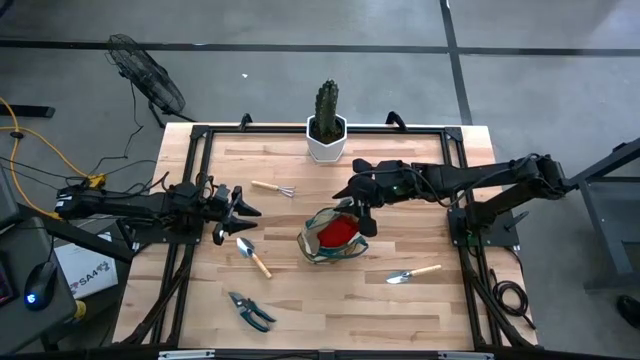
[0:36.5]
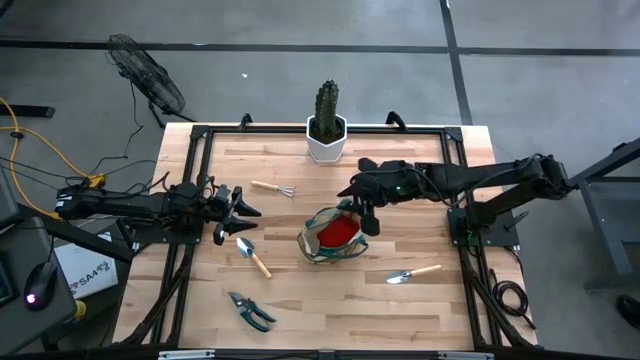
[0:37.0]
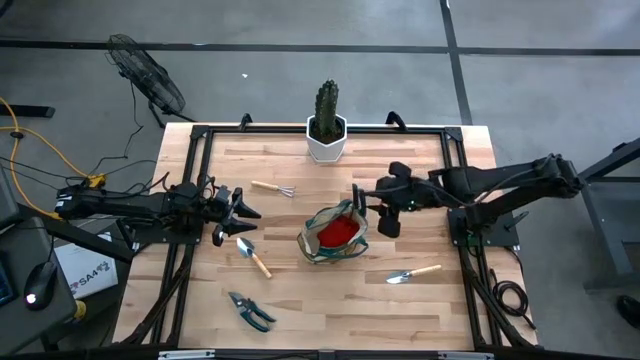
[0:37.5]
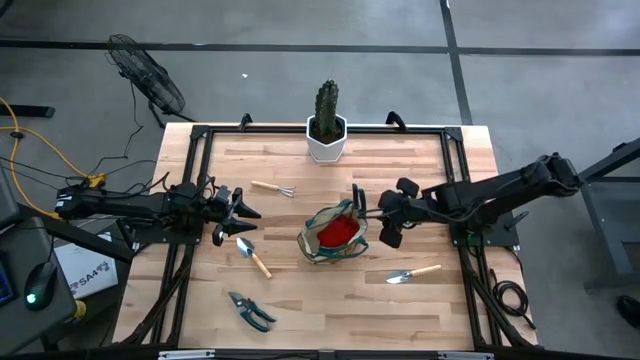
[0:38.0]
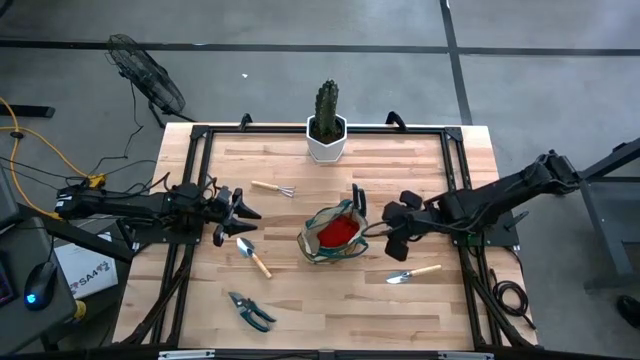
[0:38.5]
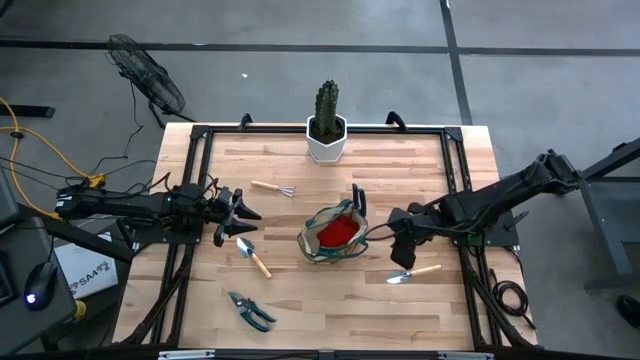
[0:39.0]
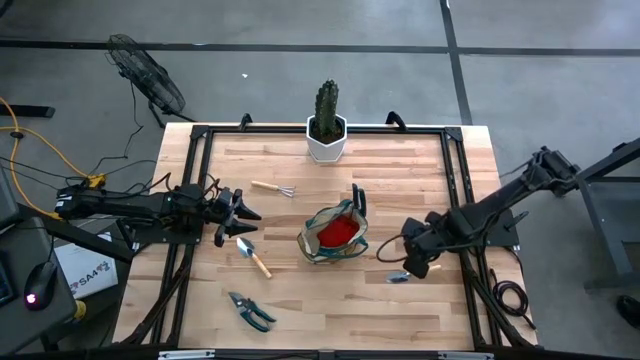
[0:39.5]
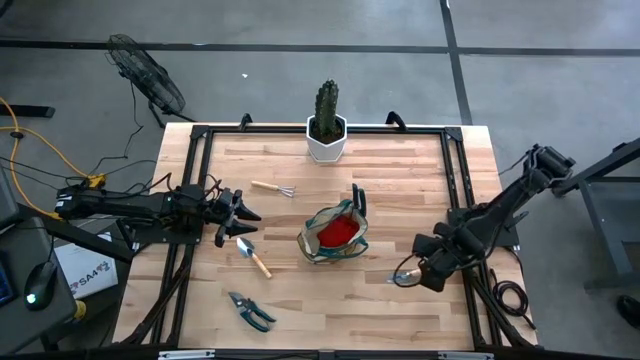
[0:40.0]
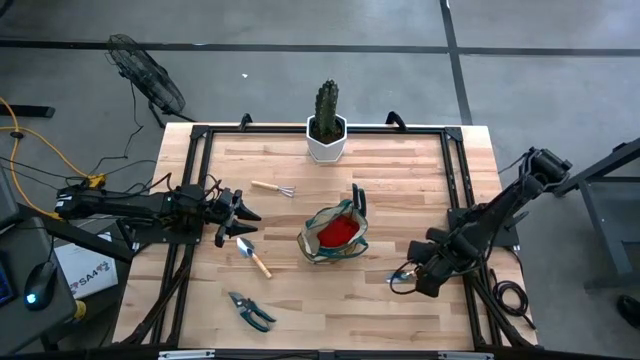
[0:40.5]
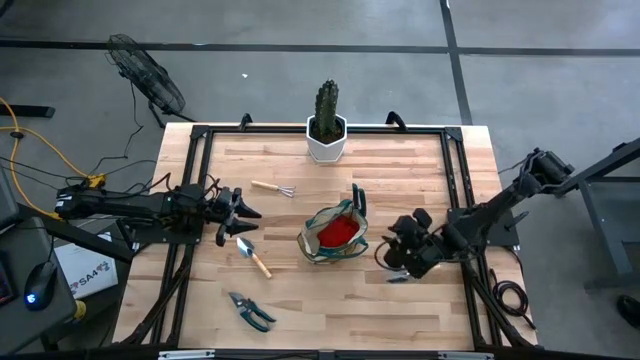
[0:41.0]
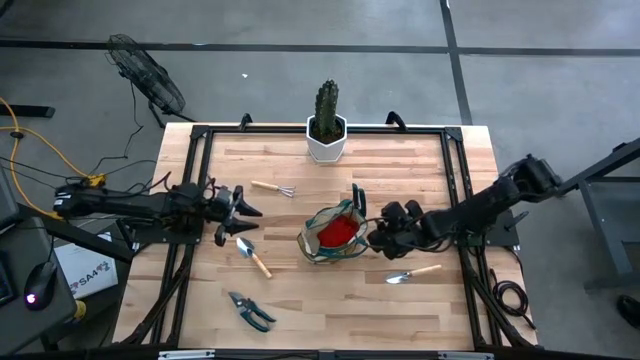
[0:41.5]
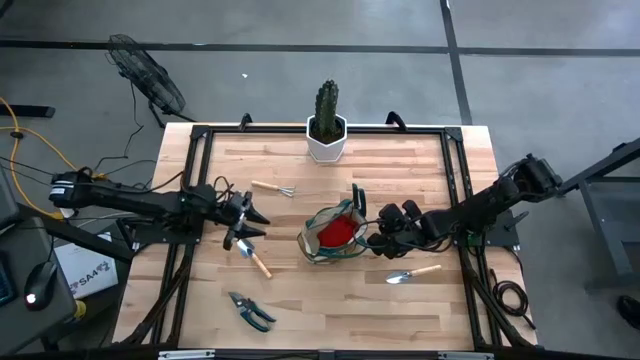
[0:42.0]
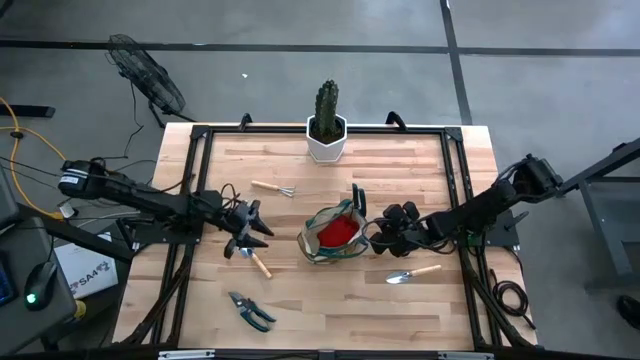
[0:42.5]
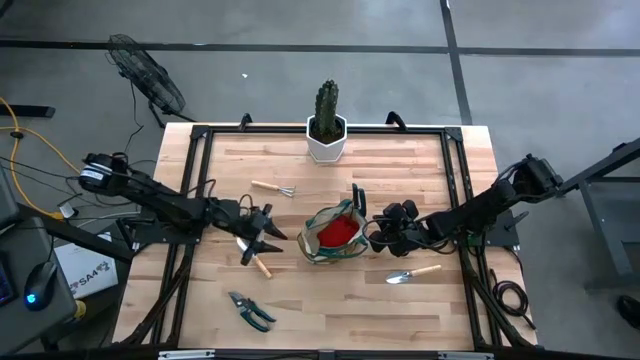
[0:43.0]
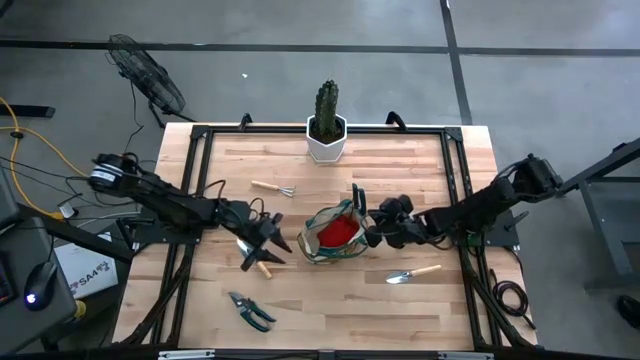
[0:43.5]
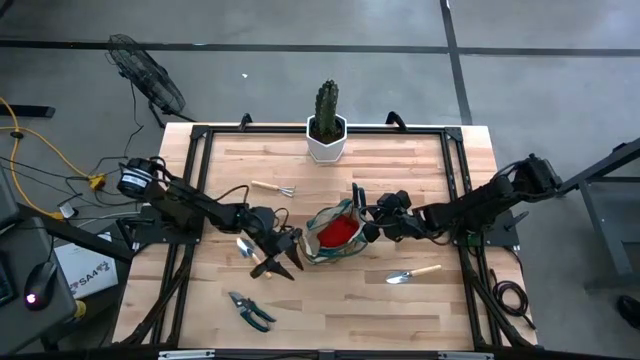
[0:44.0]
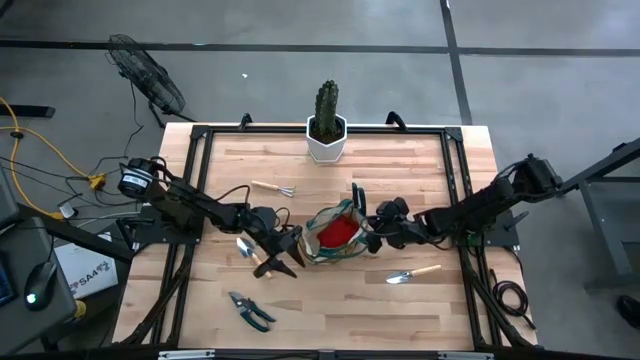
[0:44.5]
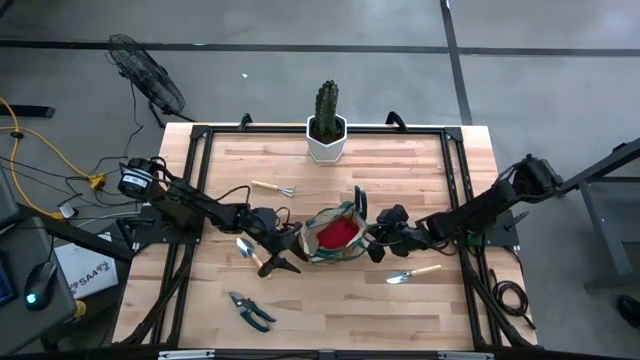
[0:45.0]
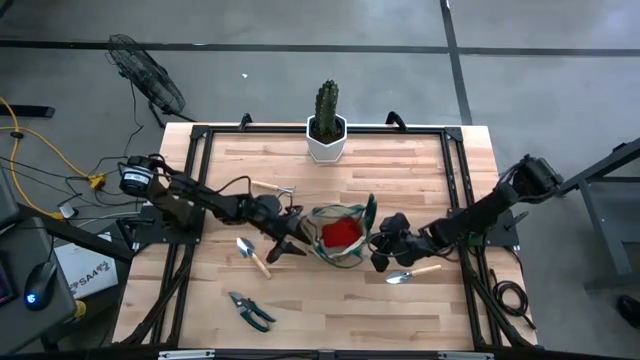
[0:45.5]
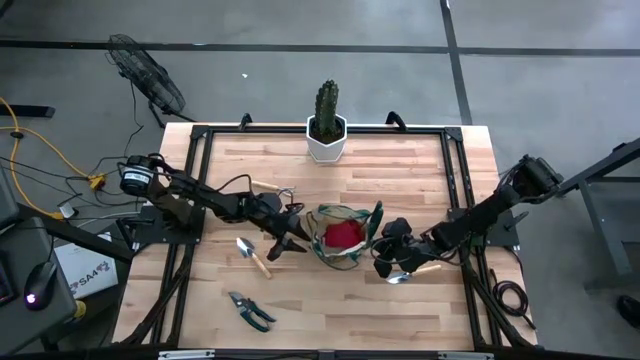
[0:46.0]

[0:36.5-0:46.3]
Task: Pick & Place Garden tools in Gardening bag
Adjust the brown gardening bag

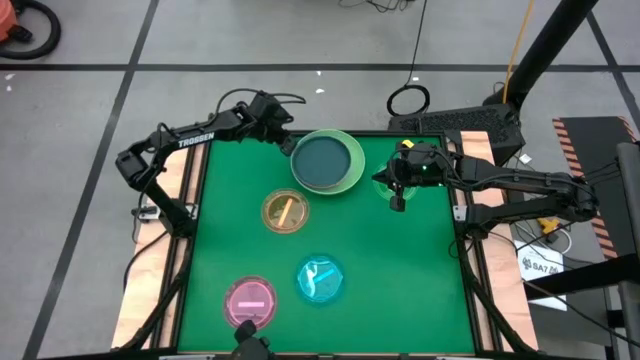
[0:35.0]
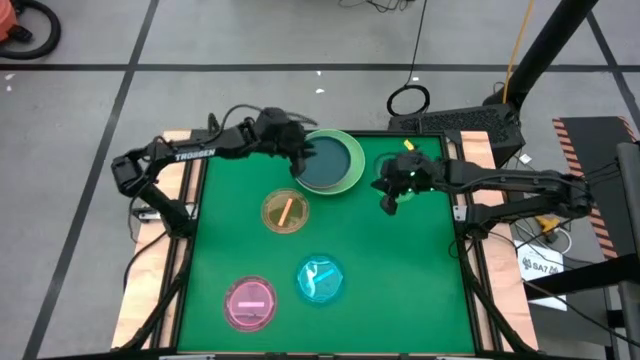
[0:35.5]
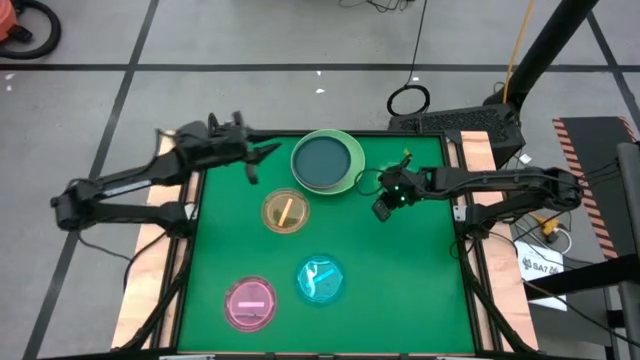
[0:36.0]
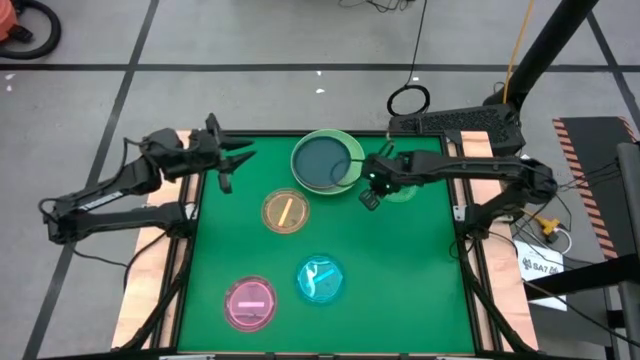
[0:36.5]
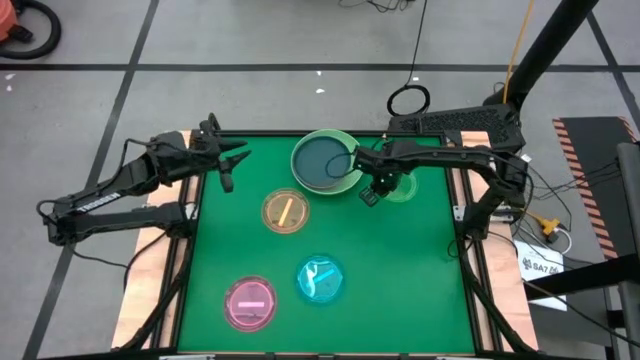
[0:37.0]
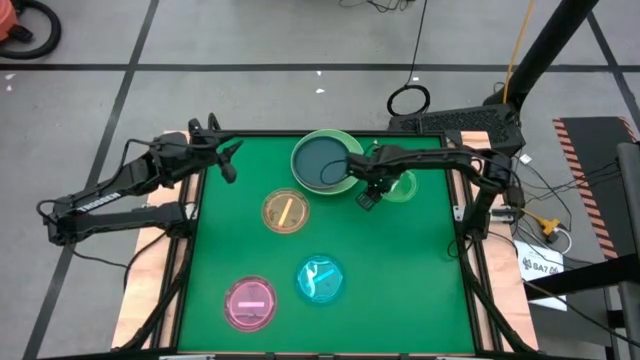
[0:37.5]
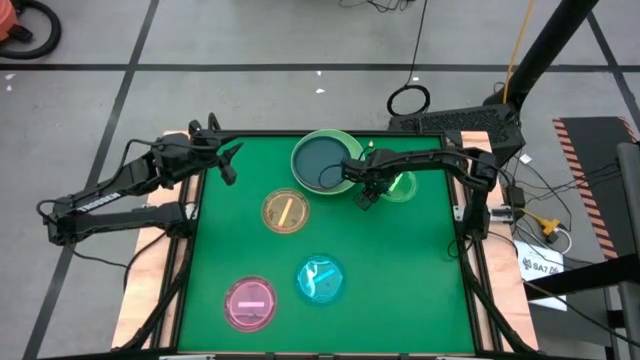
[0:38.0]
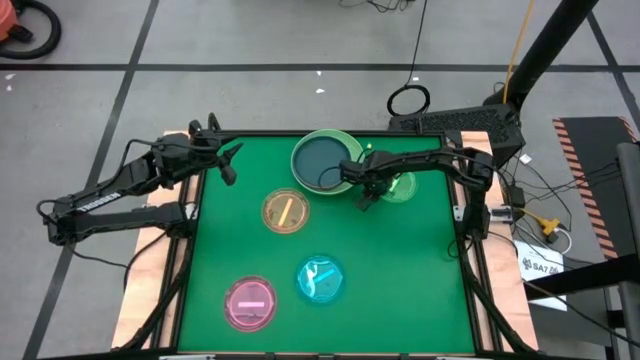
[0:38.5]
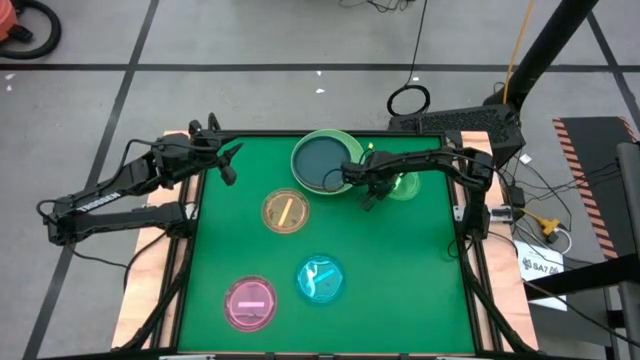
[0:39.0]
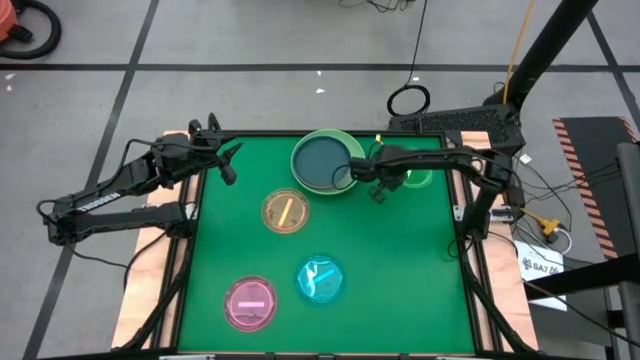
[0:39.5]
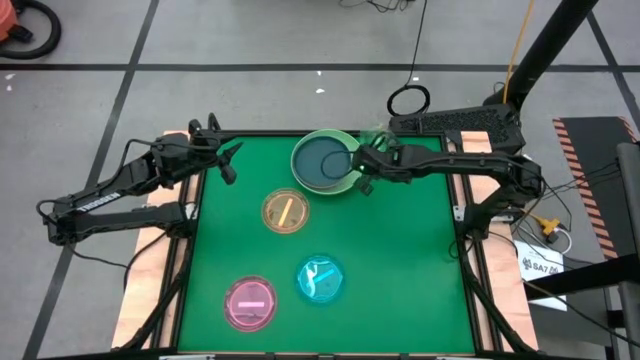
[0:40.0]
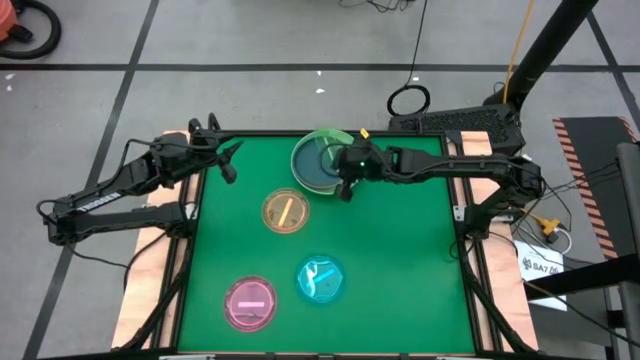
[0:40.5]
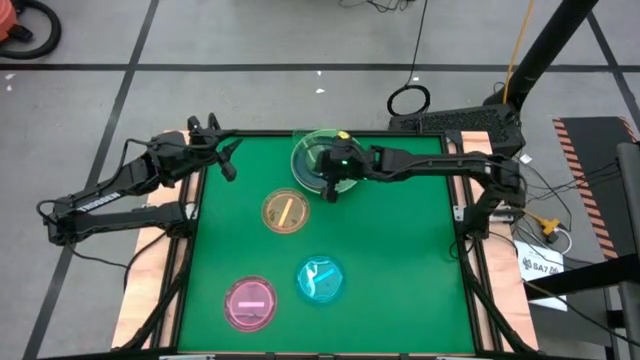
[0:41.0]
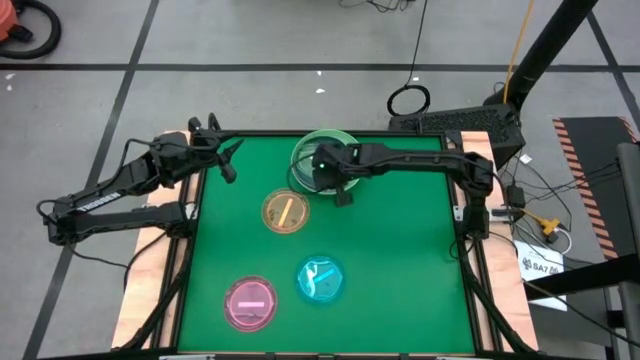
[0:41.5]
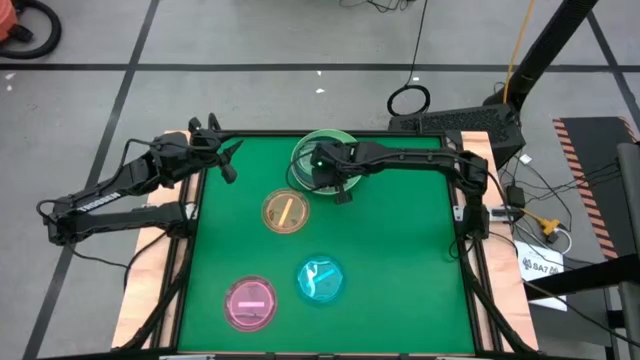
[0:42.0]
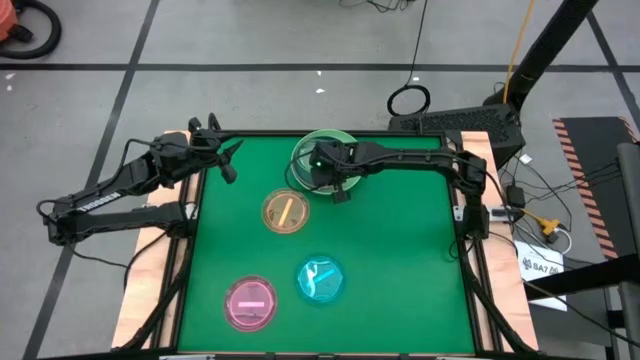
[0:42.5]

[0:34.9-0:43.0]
Task: Stack plastic plates
Stack the green transparent plate on top of the dark blue plate

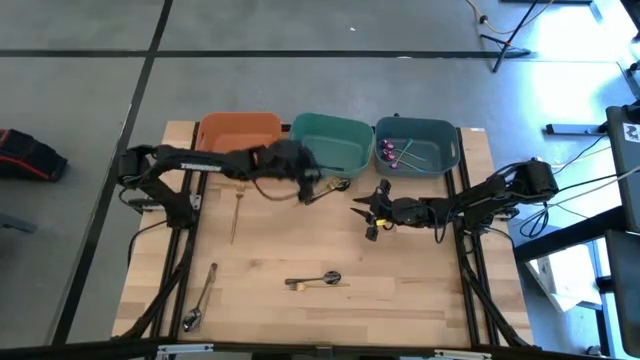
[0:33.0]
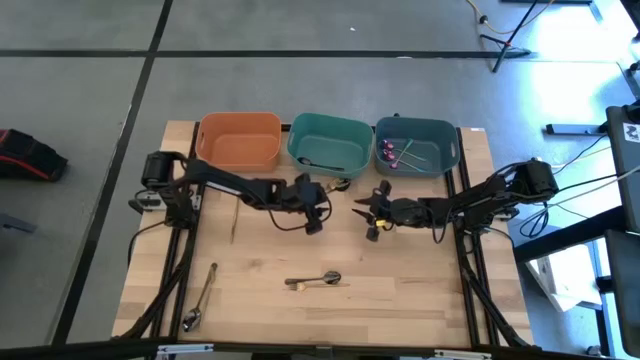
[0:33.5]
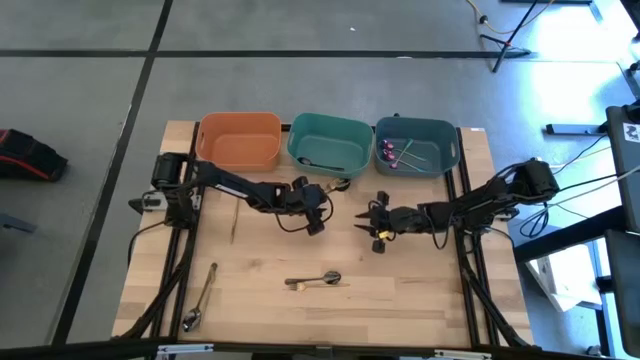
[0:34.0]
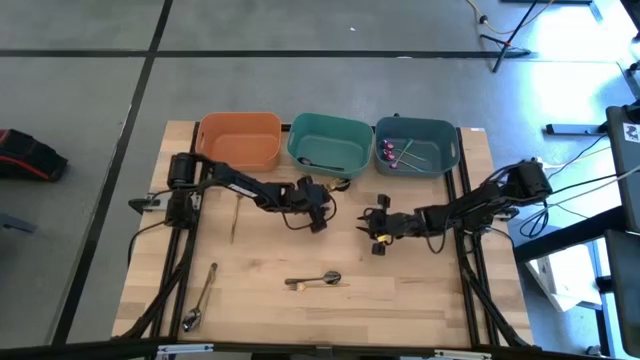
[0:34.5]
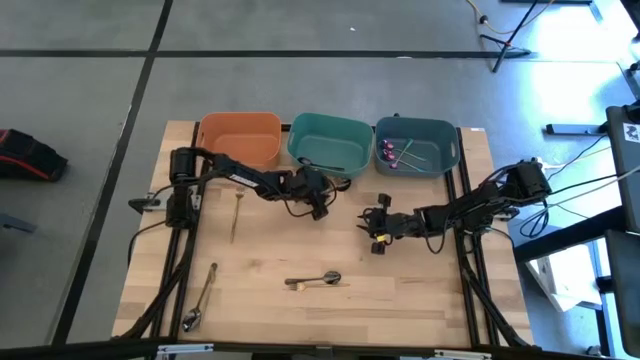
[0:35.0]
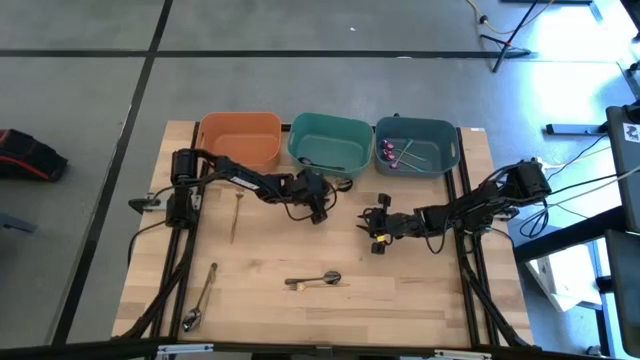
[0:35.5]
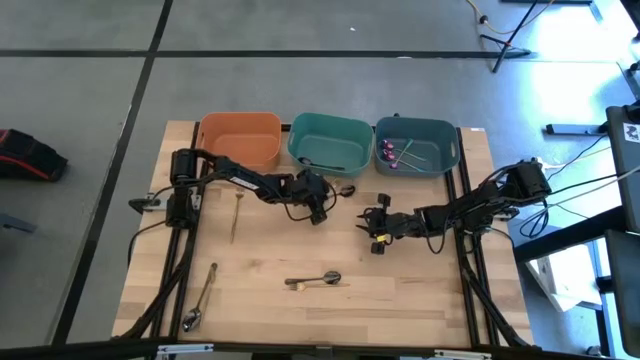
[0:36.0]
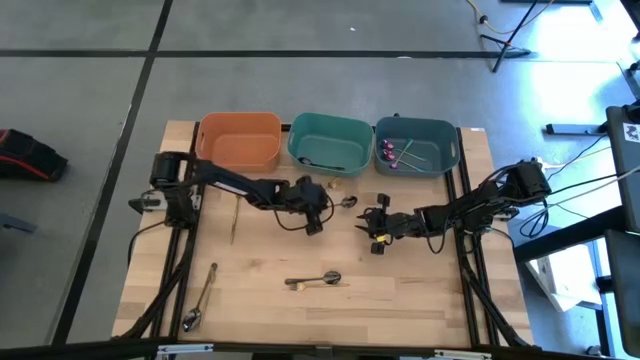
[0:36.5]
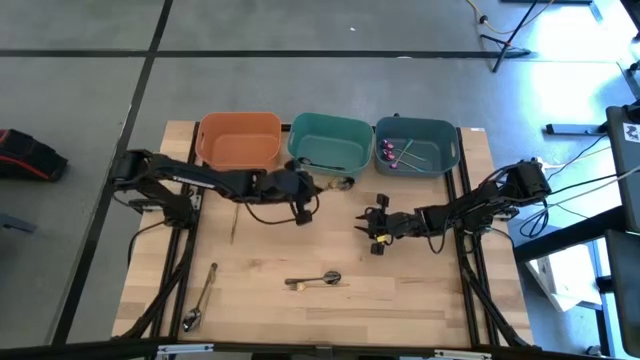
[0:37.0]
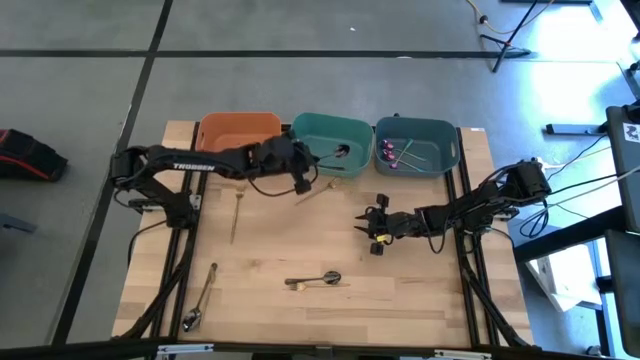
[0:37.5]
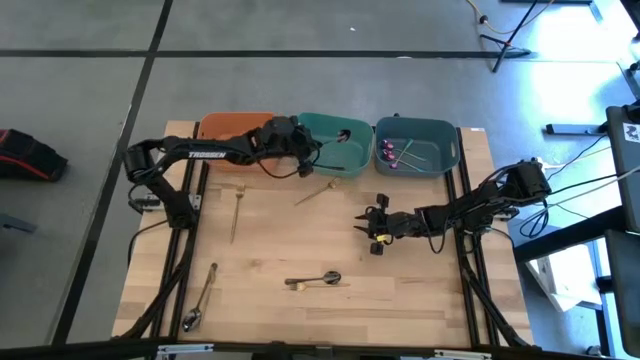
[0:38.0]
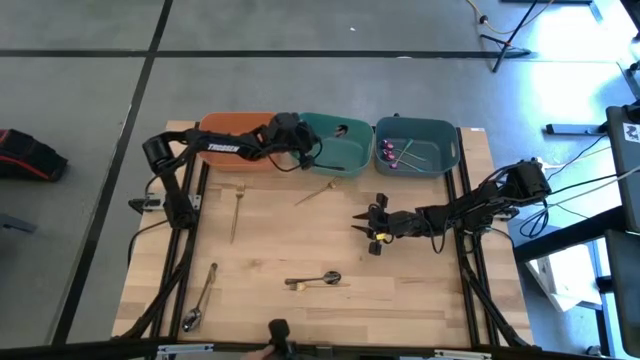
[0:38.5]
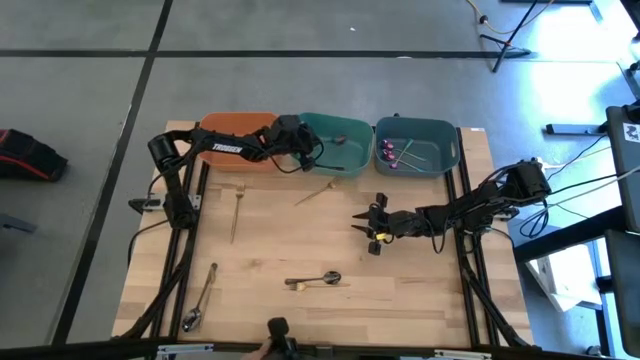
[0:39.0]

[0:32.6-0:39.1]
Task: Sort silverware by color (type)
Put the black spoon into the green bin
